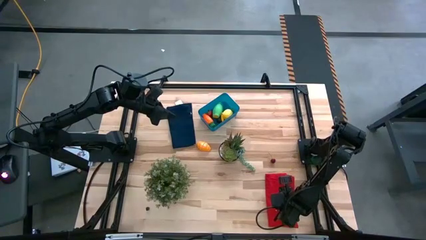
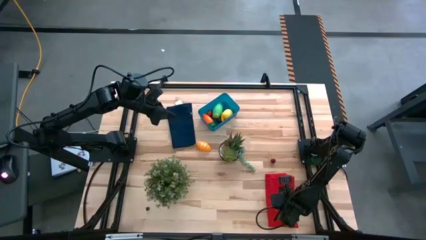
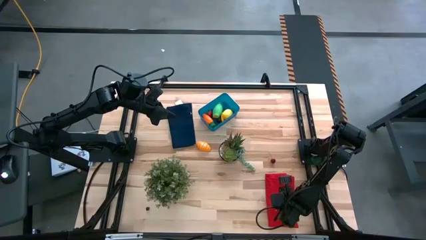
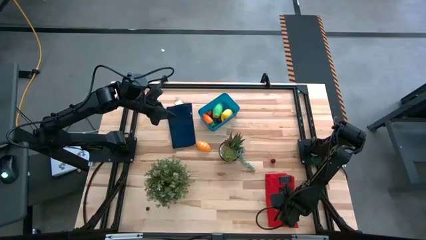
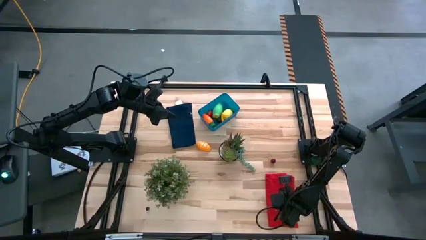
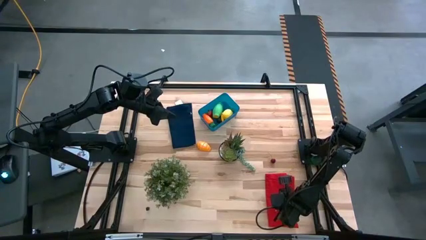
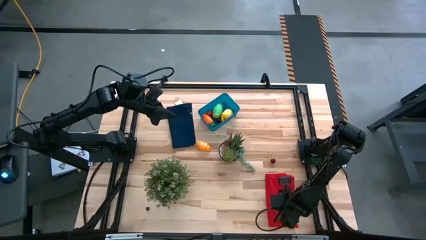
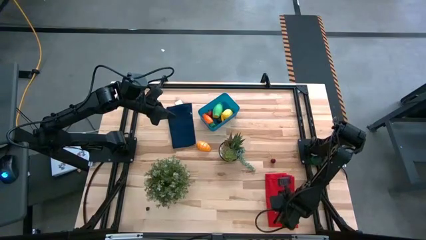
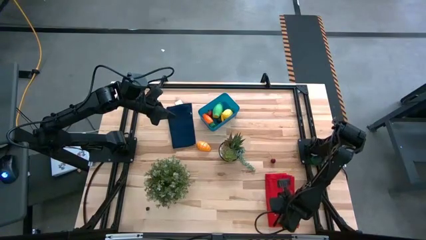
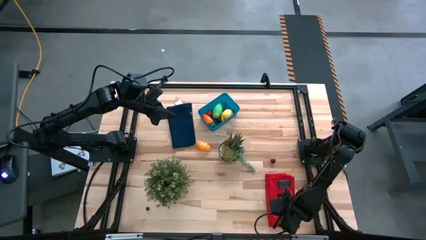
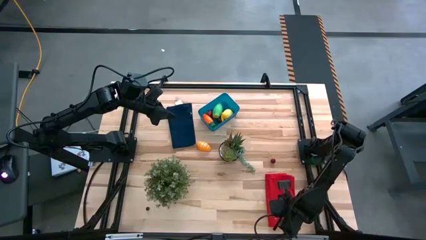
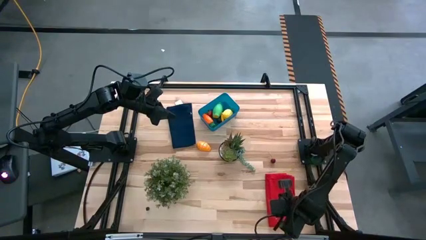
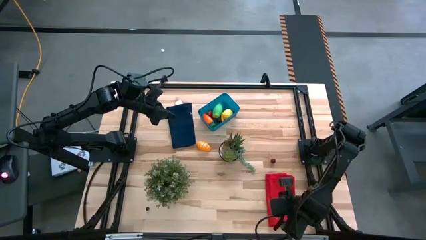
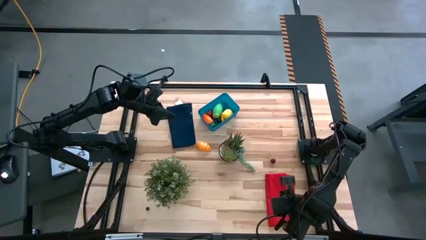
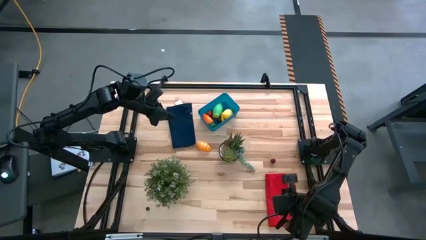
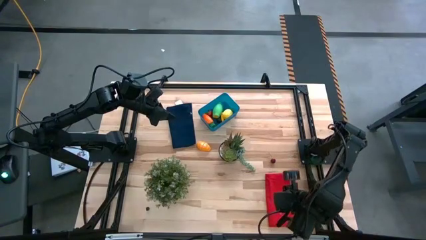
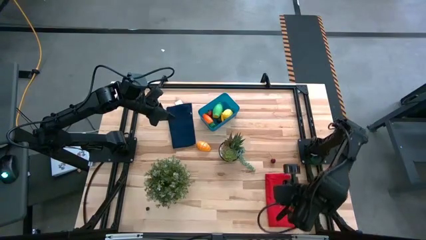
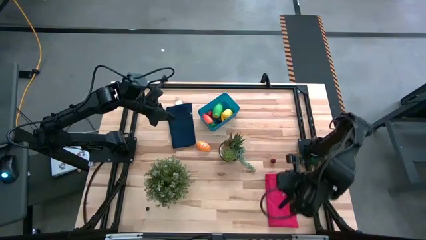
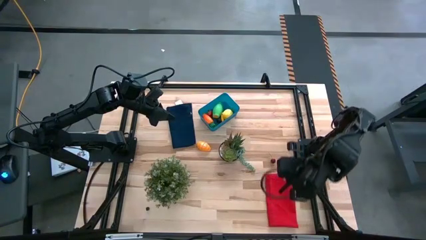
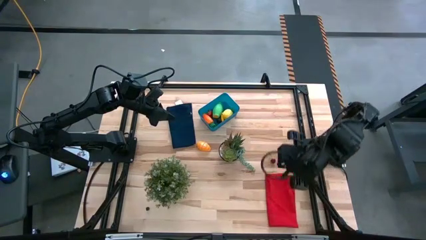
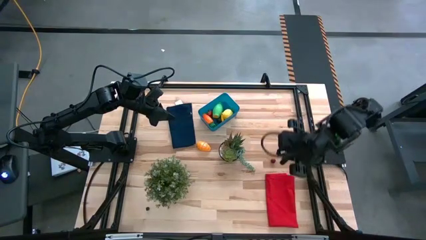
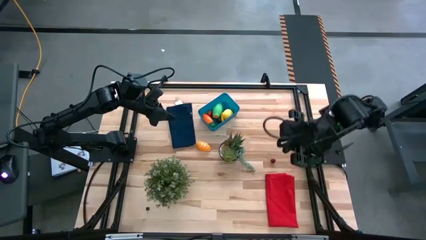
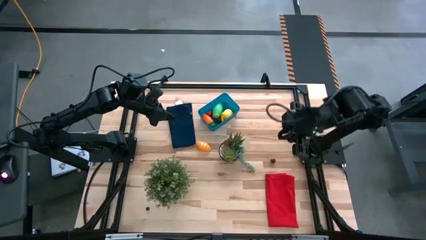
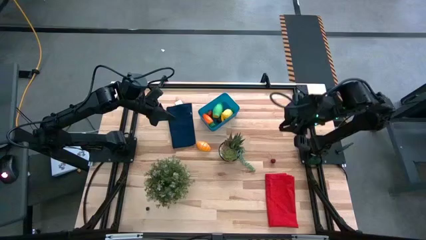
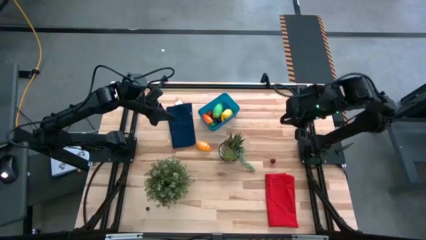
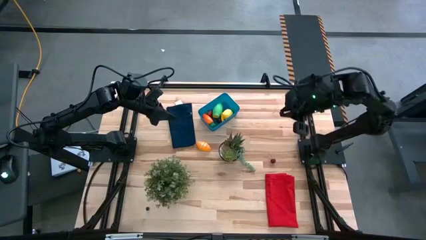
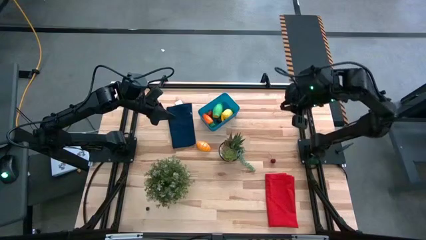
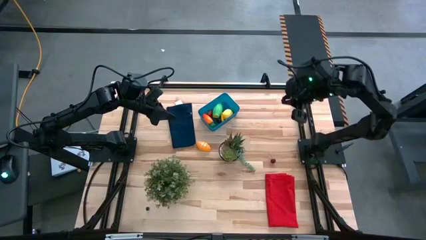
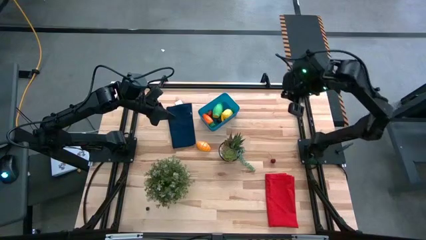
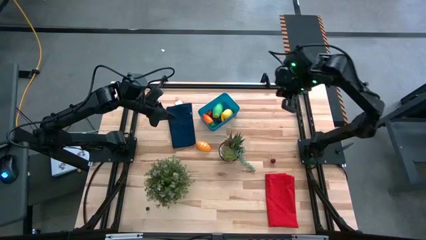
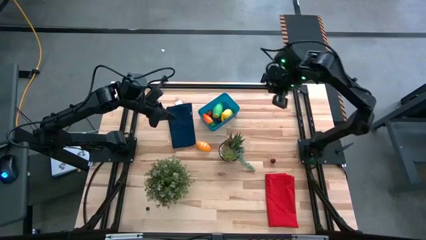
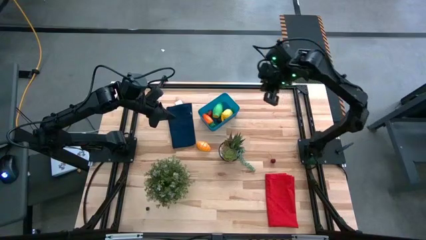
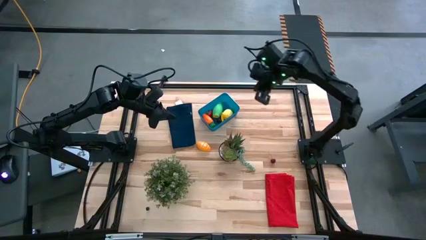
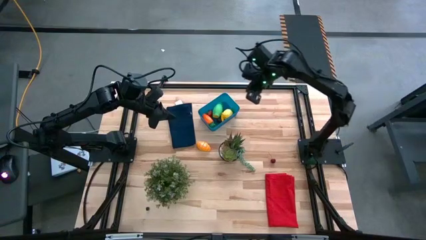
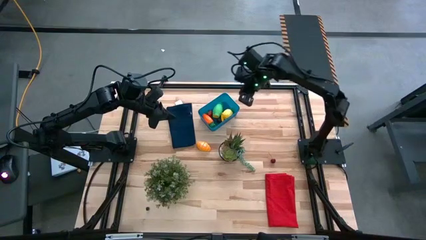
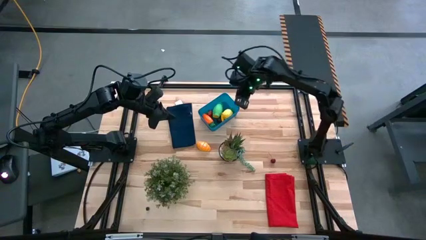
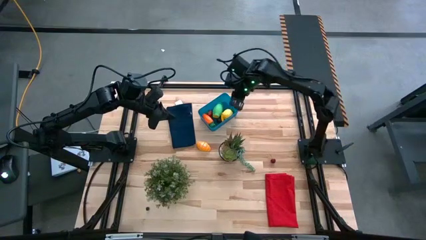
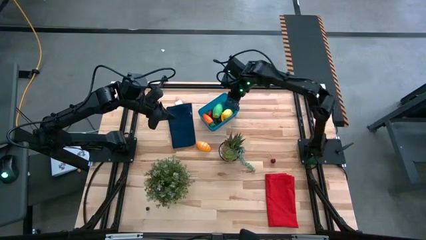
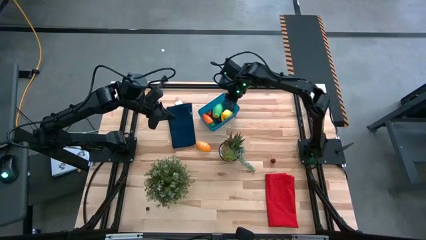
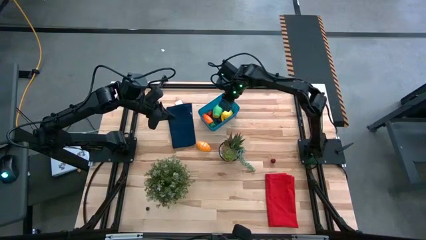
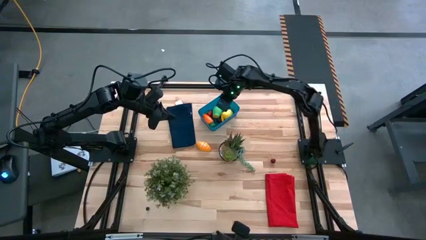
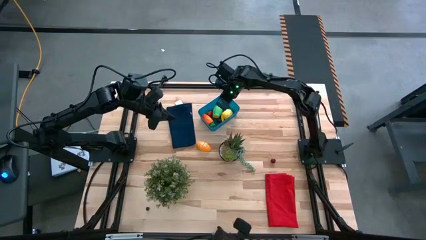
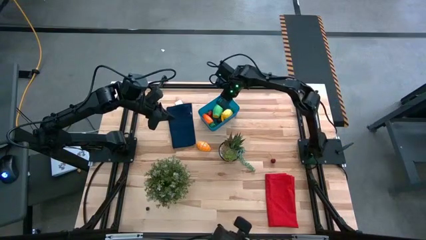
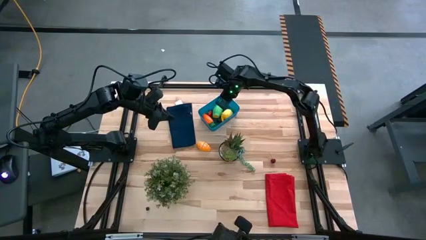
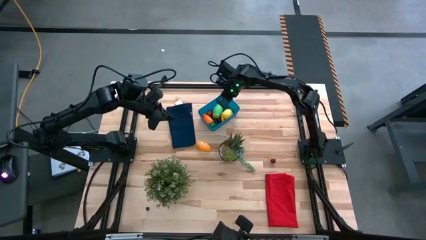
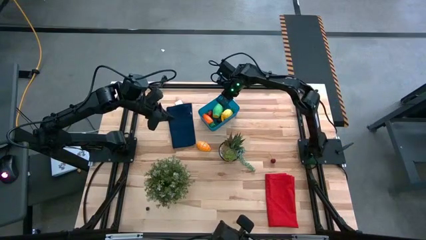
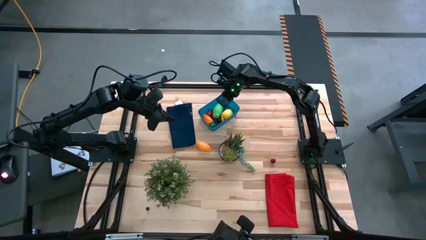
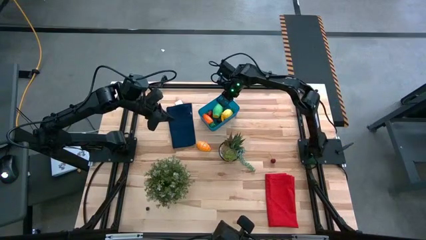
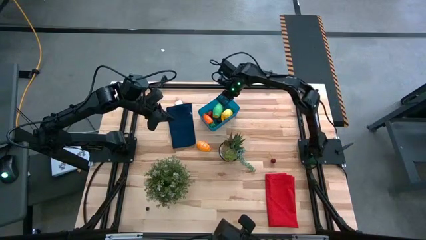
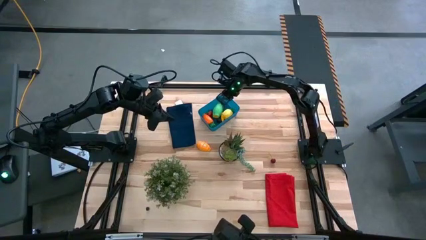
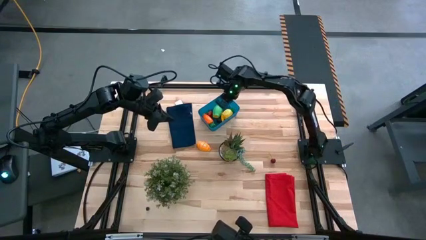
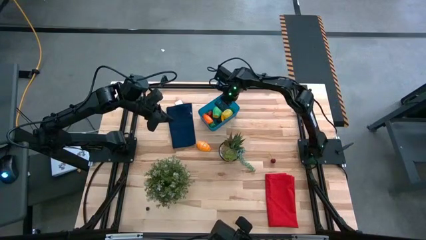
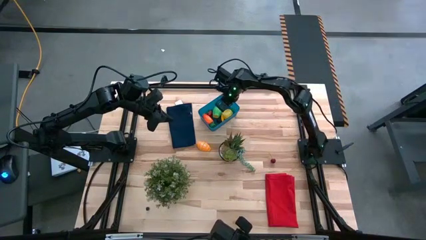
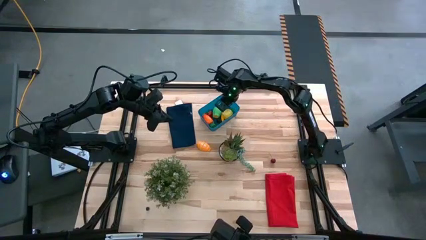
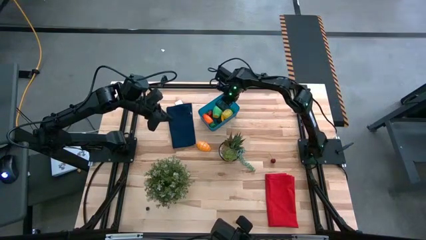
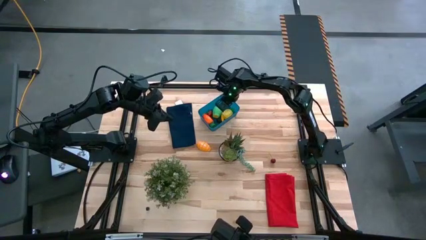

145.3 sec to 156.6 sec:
Task: Pick and placing Produce into tupperware
Put the right blue berry into the blue bin

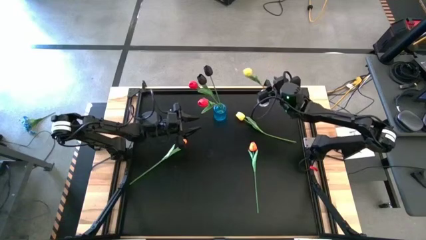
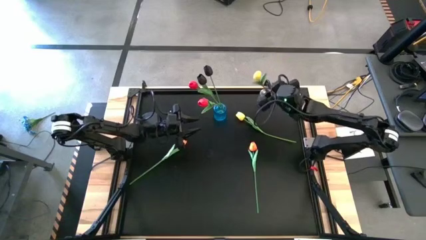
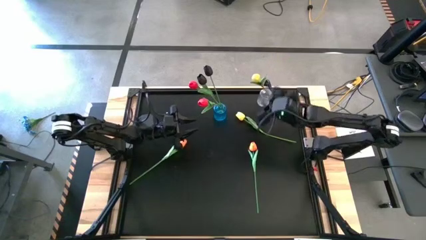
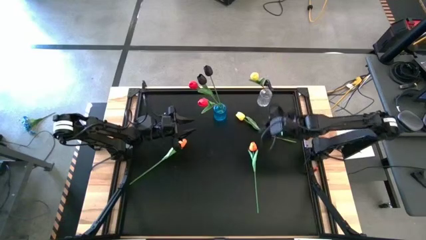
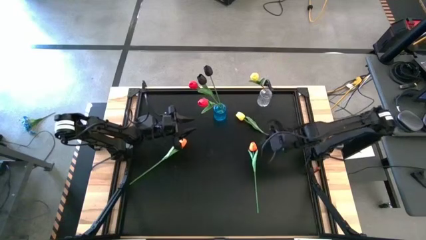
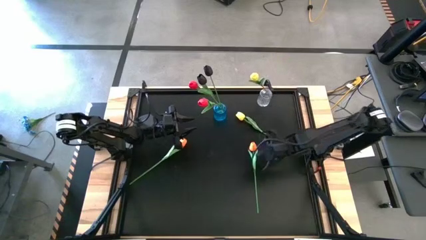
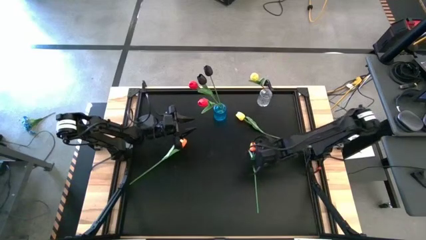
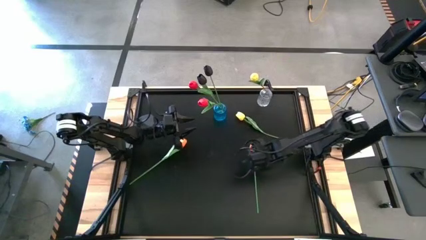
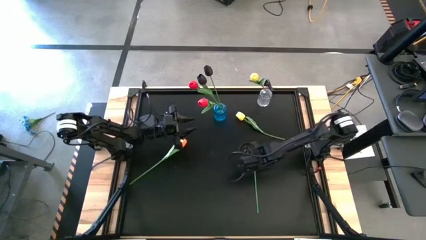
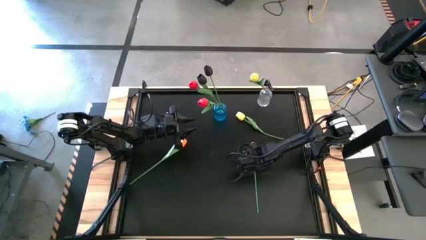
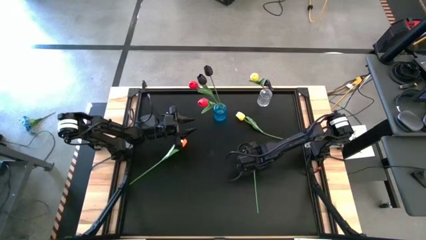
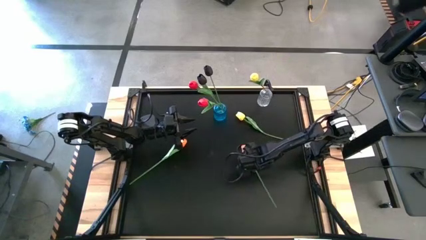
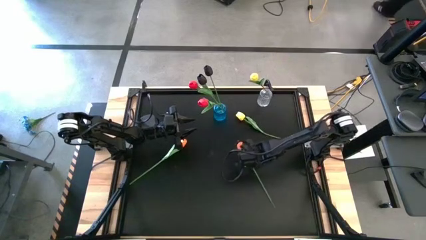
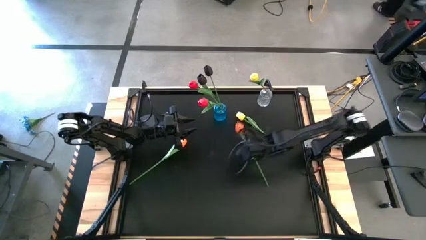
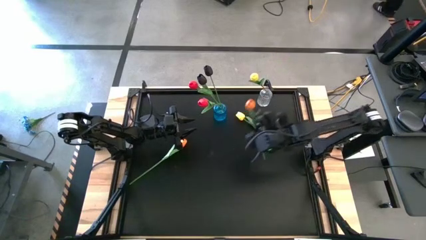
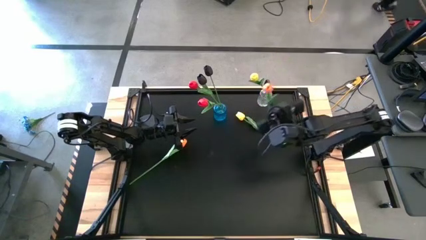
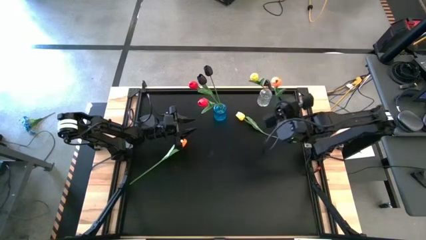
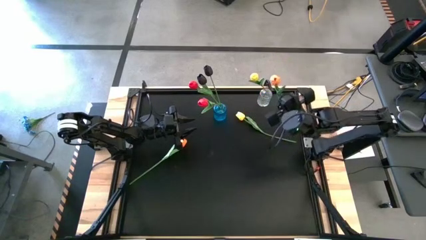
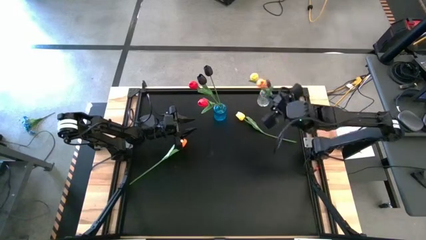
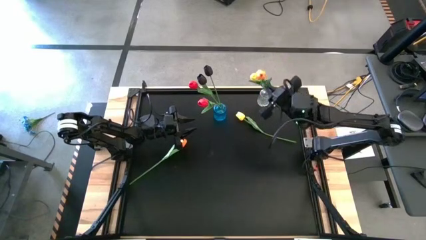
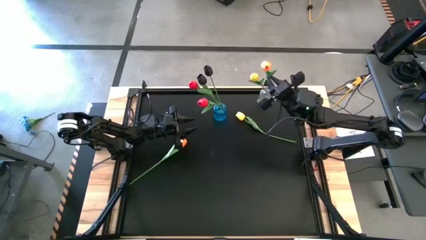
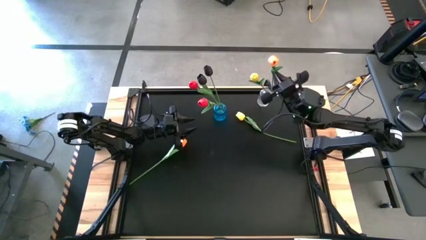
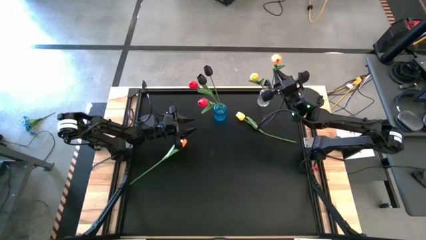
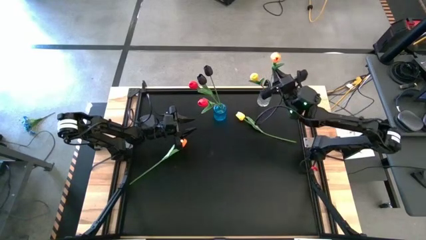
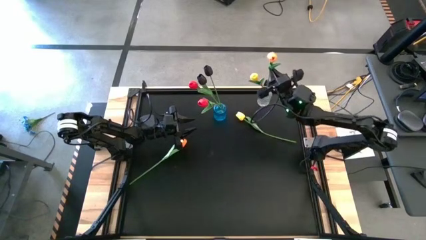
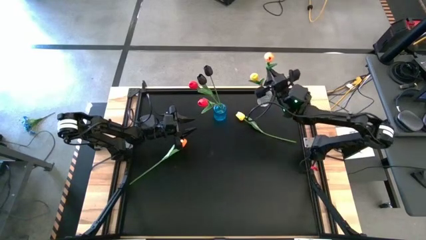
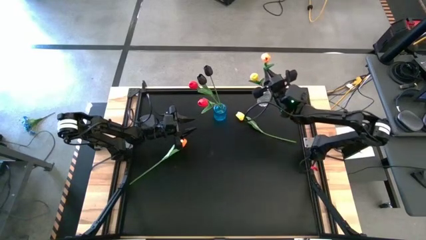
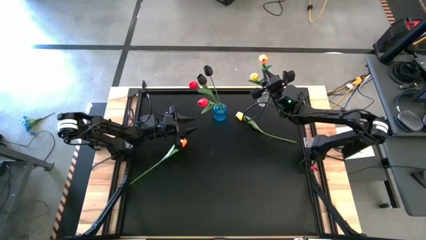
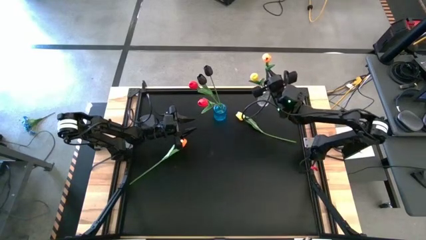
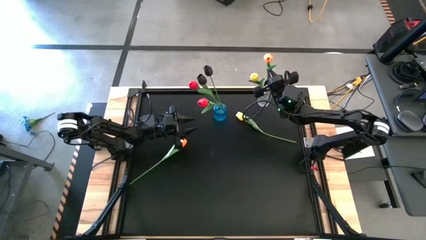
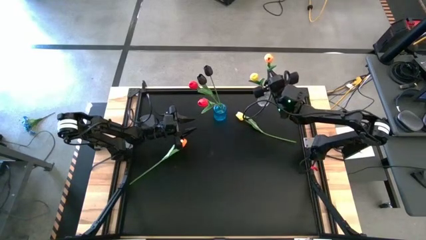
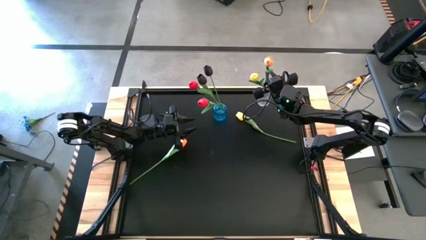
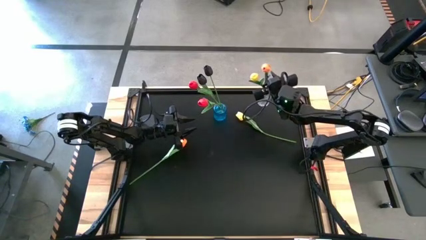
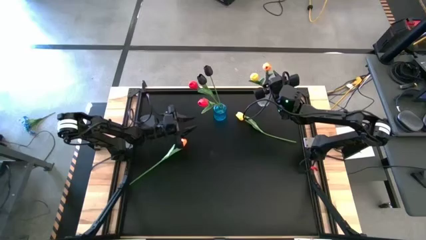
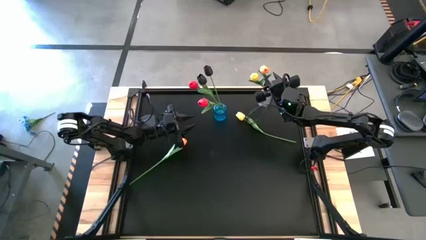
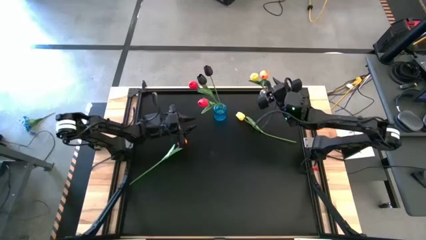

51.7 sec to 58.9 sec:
Task: Sort flowers into vase by color
Put the right orange flower into the transparent vase
